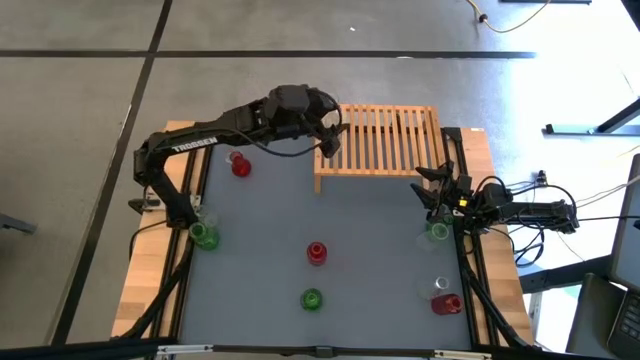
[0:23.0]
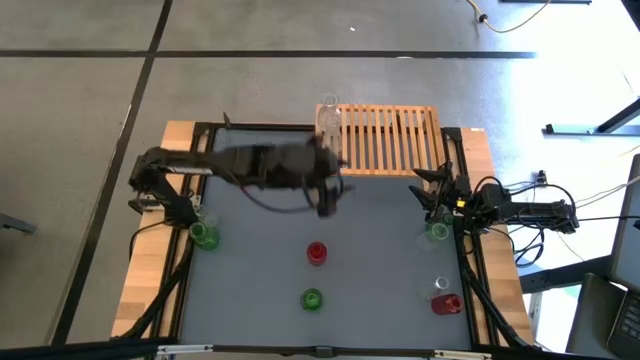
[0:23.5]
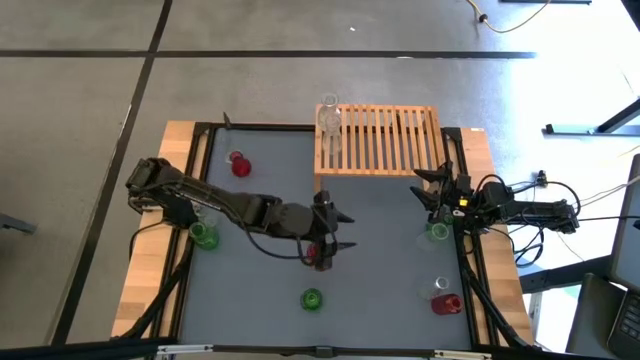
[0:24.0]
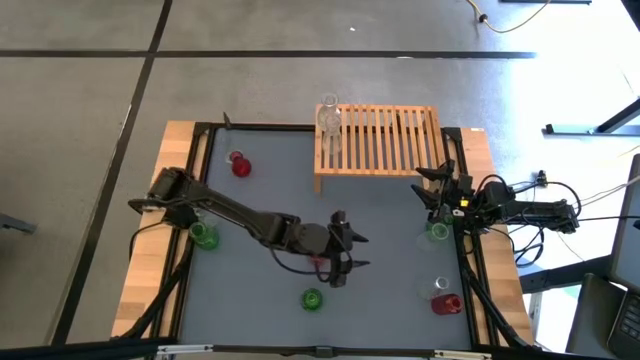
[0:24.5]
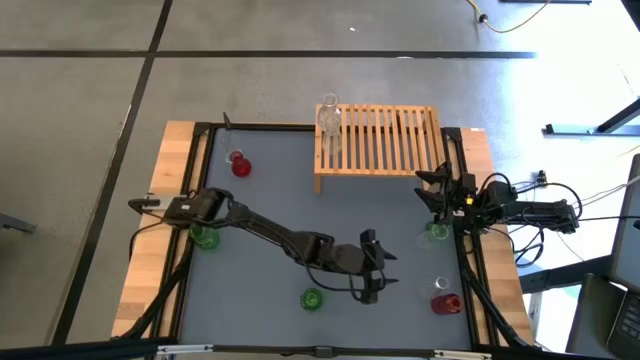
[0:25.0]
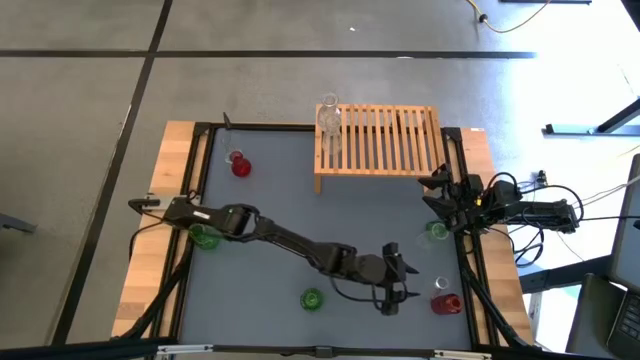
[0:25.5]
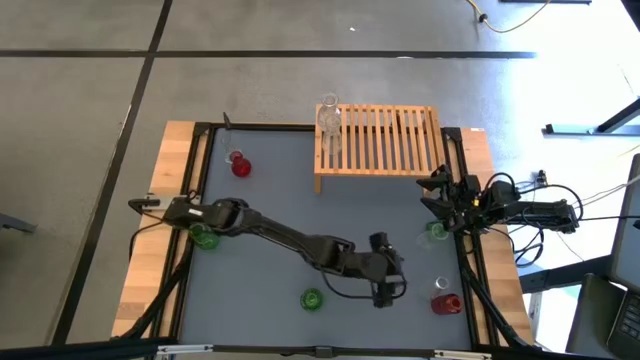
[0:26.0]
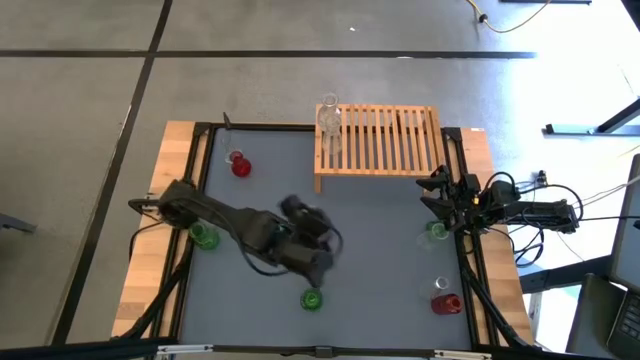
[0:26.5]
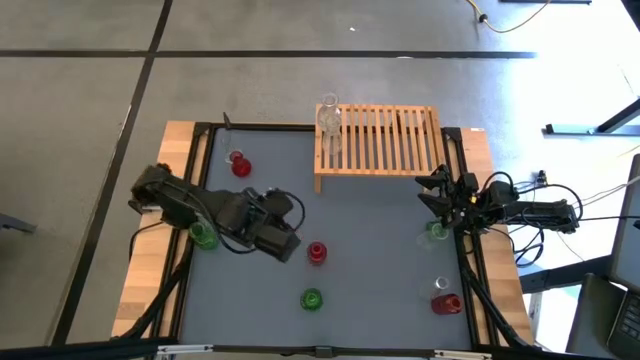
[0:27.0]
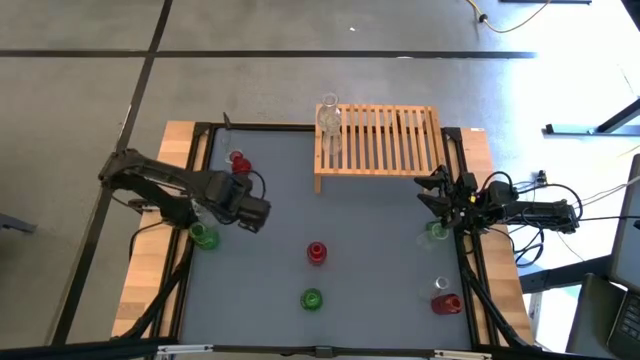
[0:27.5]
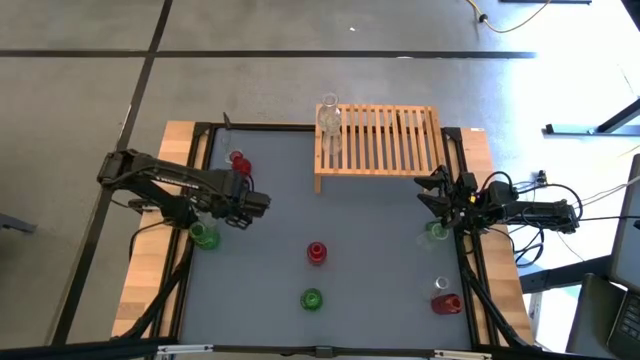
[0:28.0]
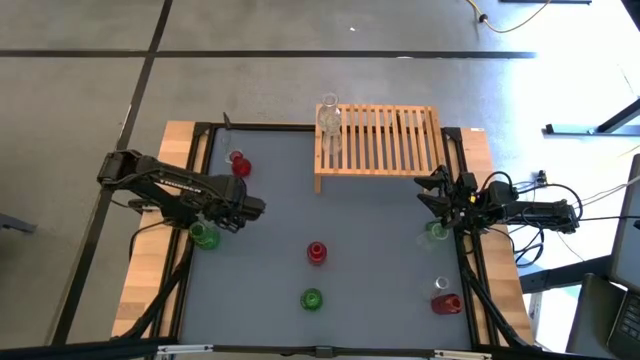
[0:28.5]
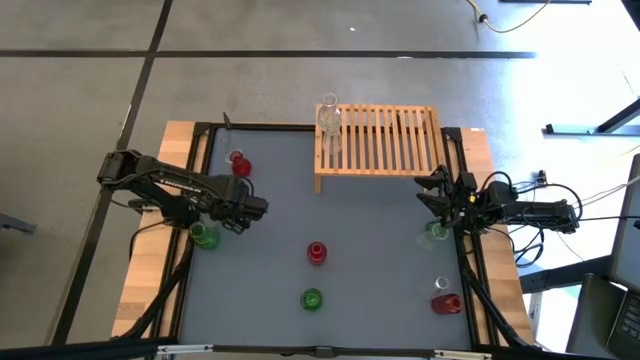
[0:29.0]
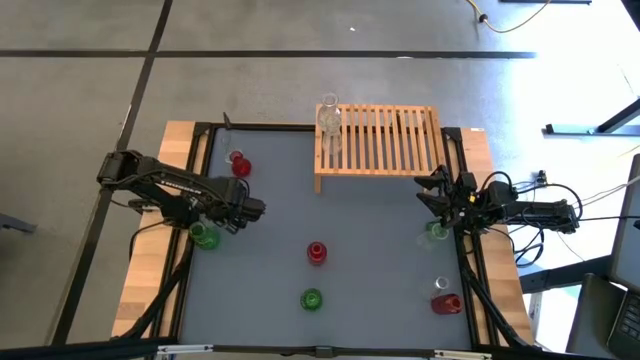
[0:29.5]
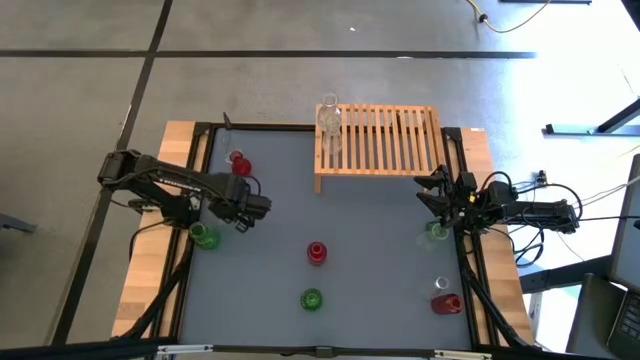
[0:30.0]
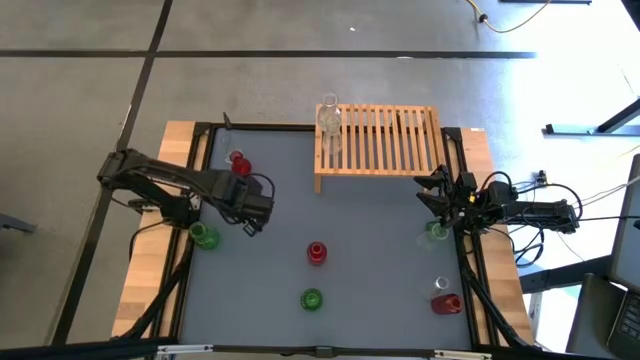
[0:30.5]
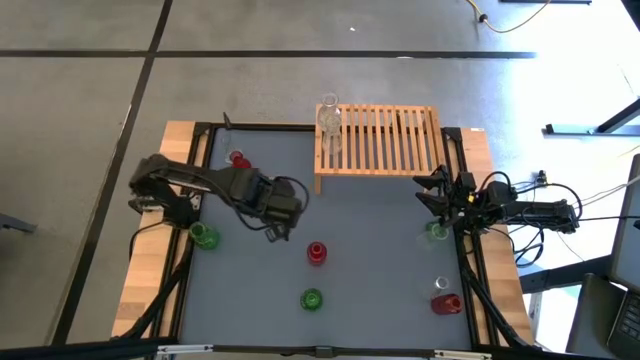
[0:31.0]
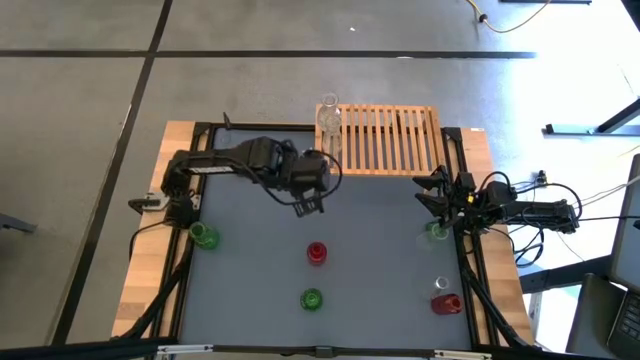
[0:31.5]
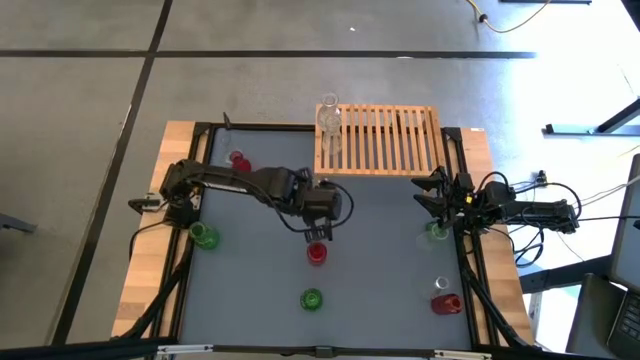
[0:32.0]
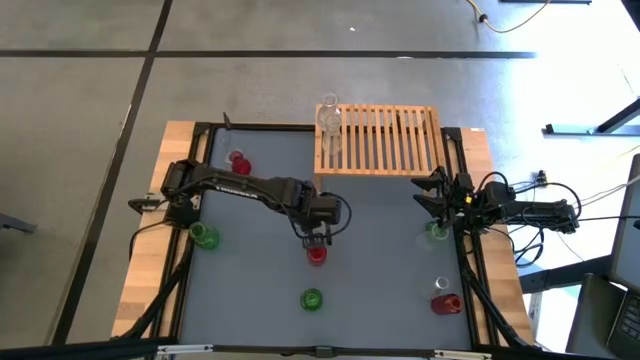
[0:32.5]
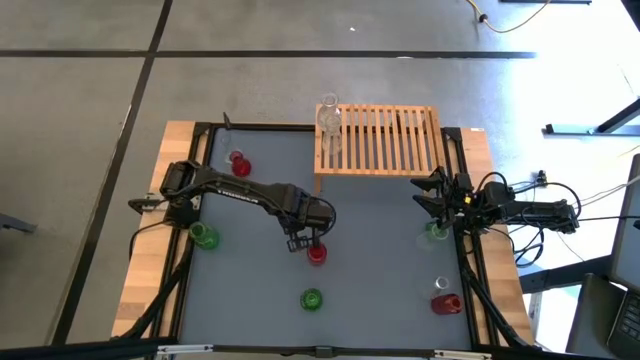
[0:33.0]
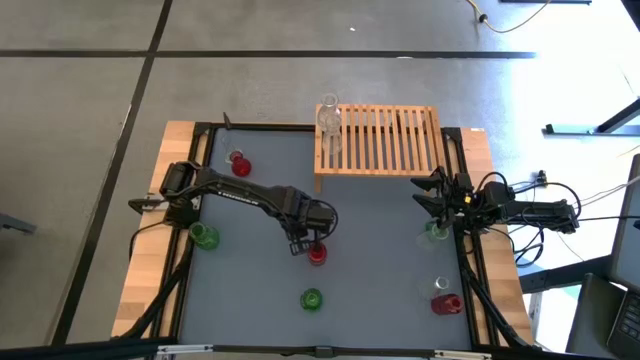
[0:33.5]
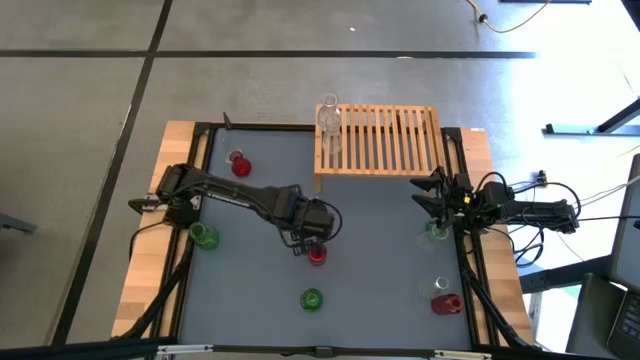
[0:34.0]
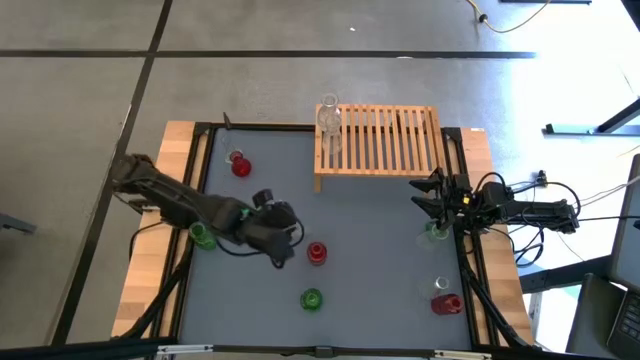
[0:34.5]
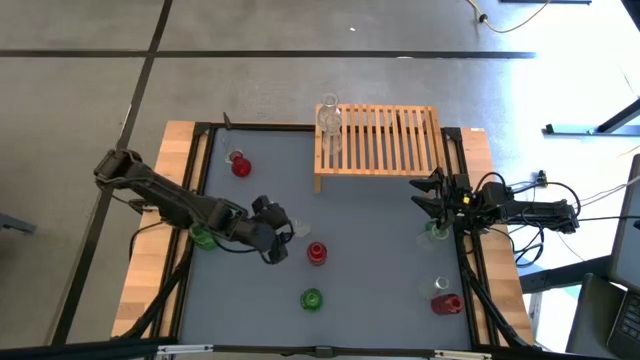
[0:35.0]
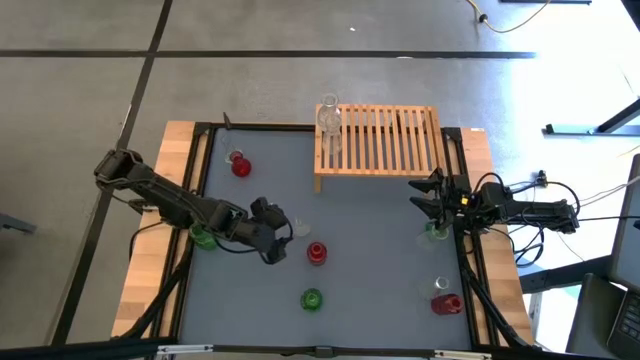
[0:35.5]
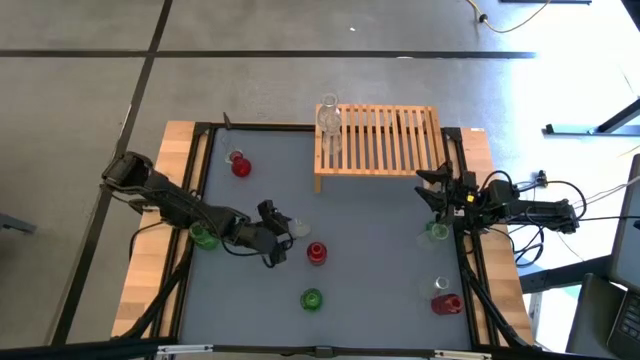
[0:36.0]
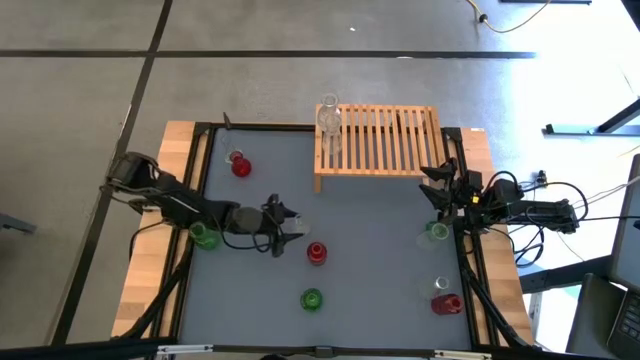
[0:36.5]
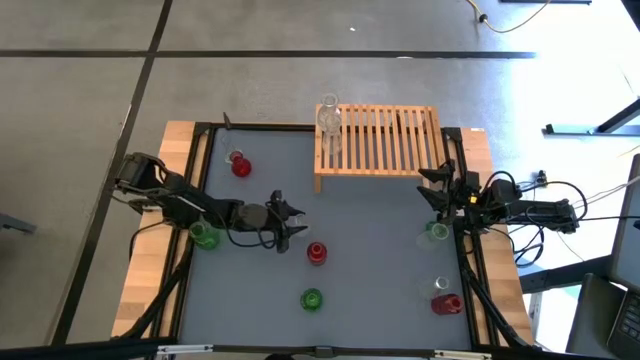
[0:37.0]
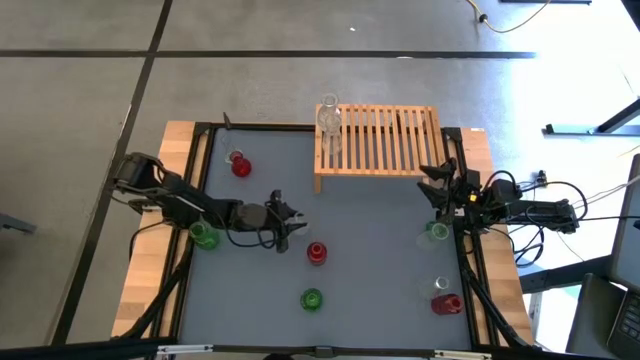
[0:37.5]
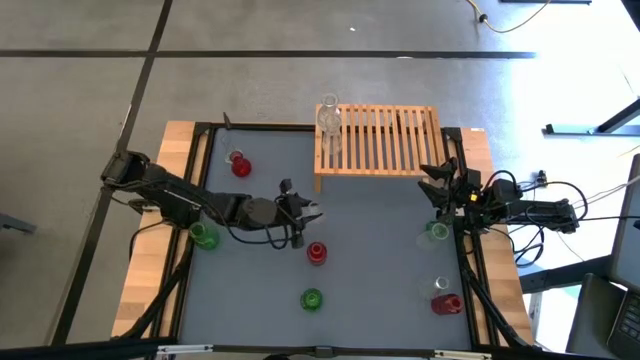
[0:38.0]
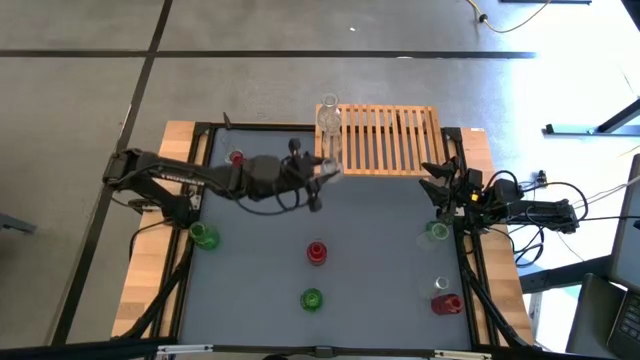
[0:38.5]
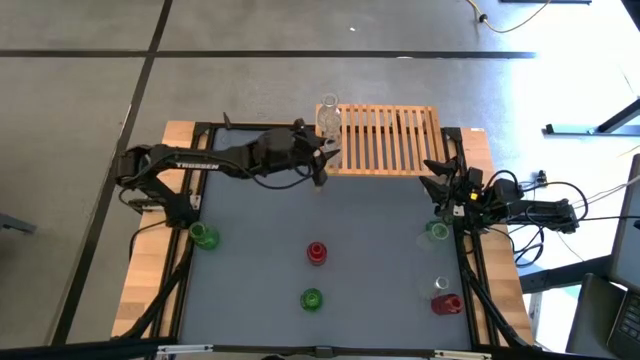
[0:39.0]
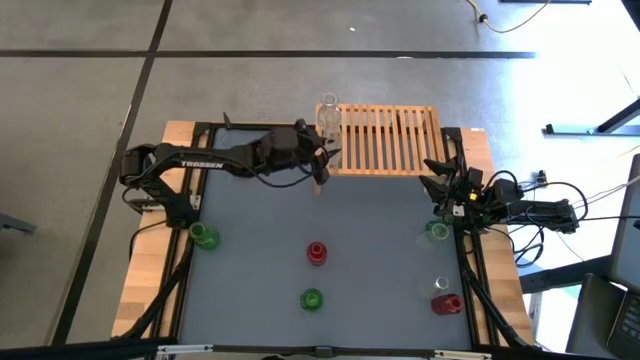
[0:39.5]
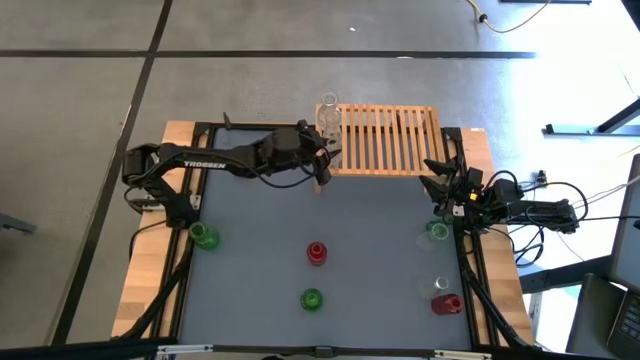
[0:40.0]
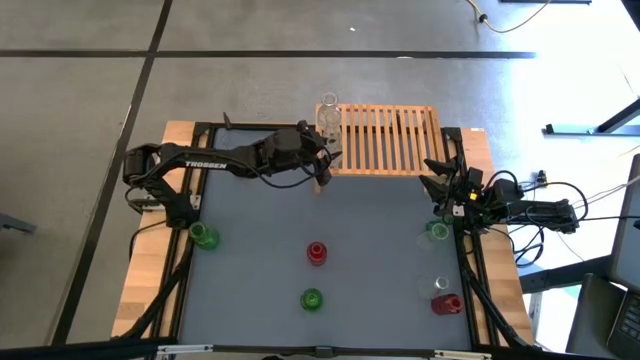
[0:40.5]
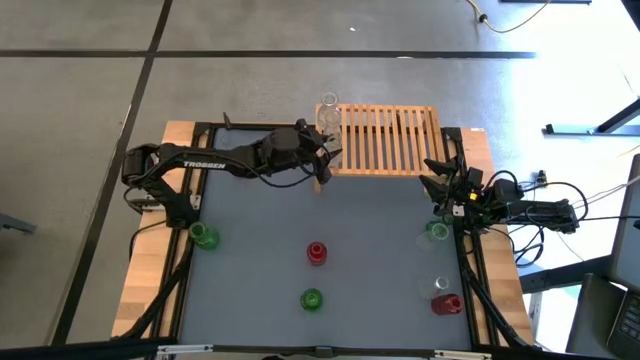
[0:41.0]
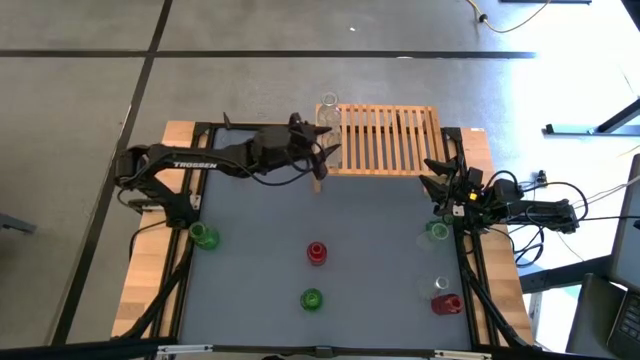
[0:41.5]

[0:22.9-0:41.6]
Task: sort vases onto shelf
Put the middle left transparent vase onto the shelf
